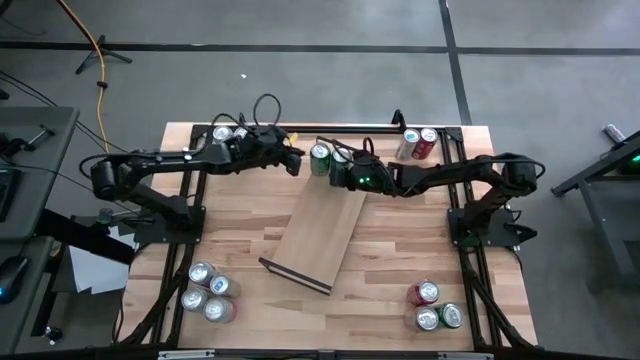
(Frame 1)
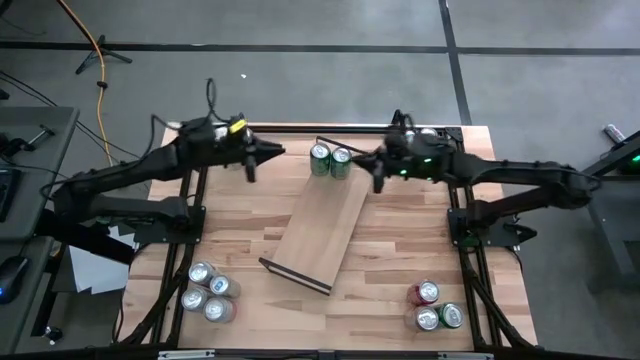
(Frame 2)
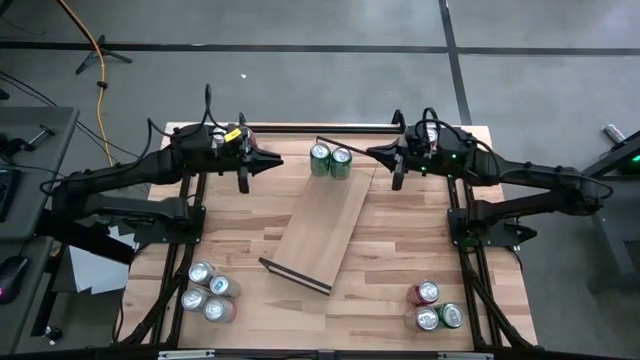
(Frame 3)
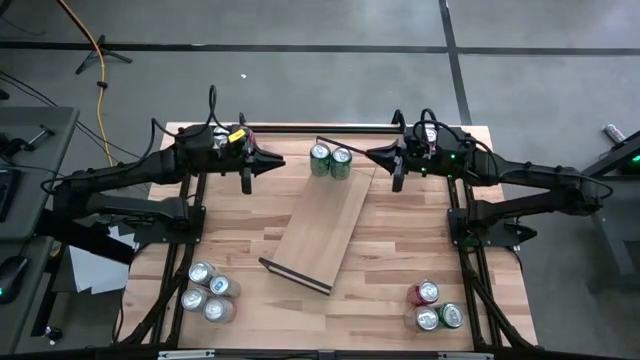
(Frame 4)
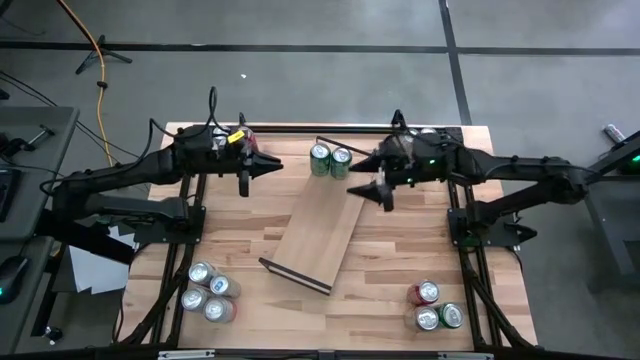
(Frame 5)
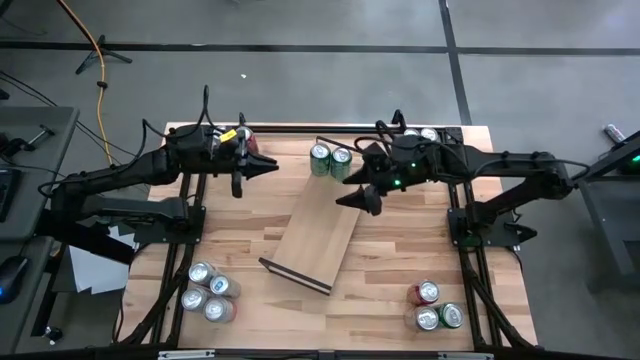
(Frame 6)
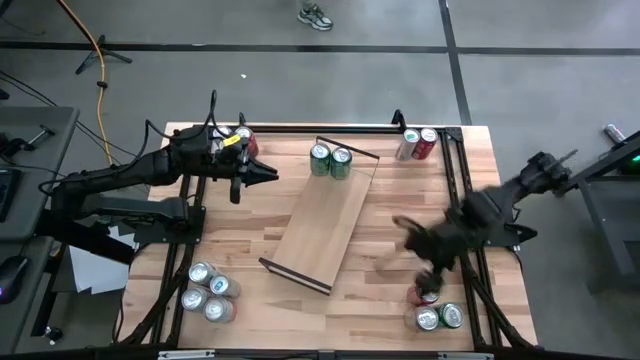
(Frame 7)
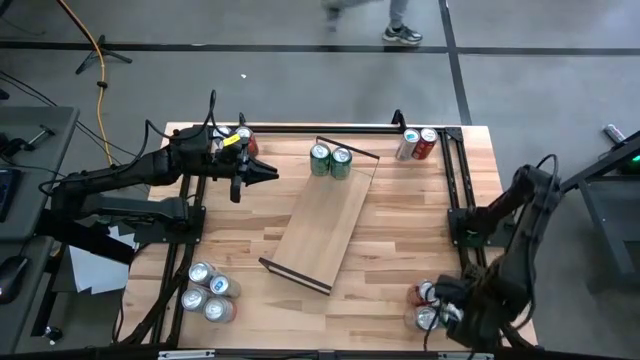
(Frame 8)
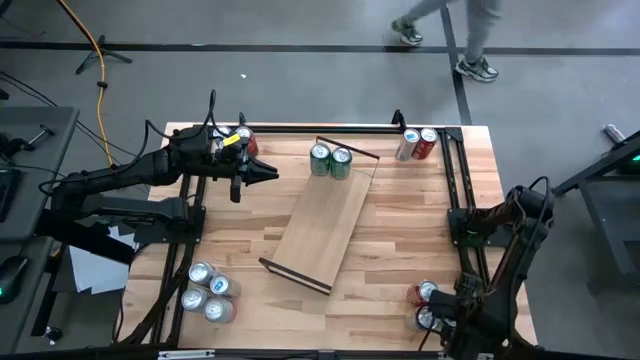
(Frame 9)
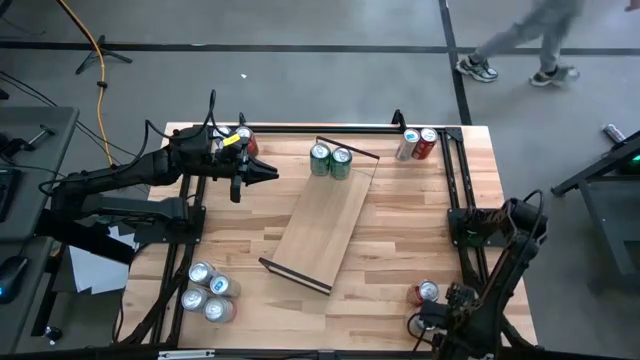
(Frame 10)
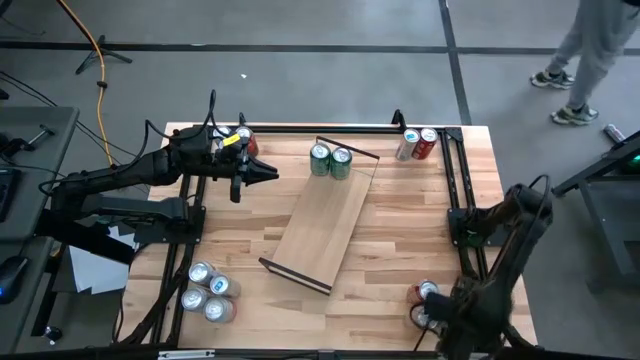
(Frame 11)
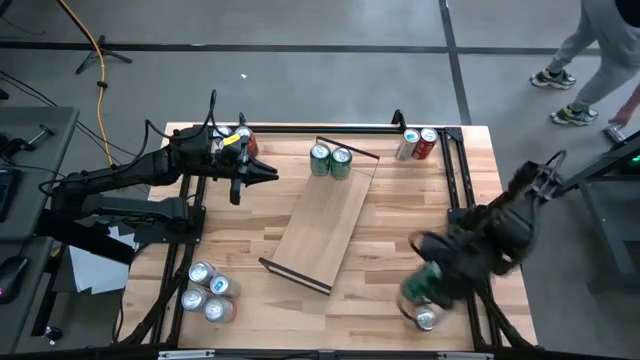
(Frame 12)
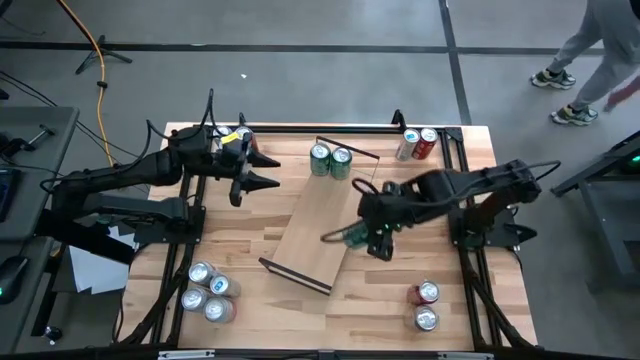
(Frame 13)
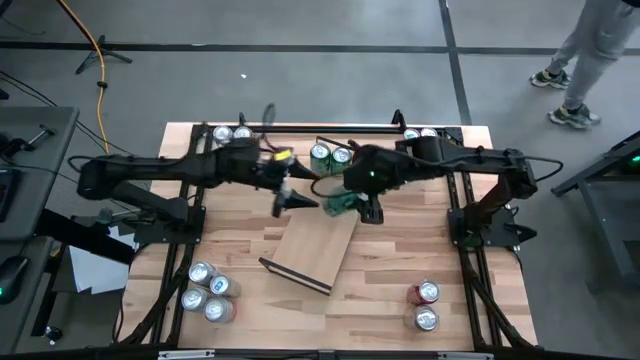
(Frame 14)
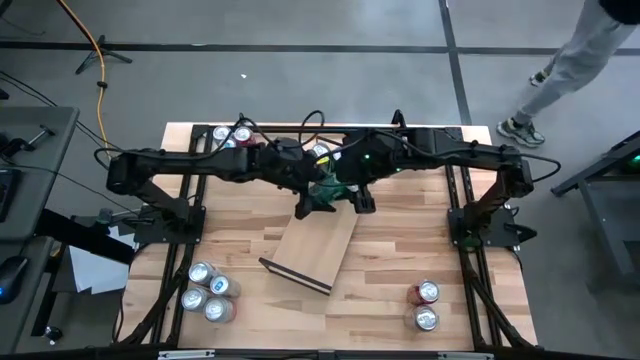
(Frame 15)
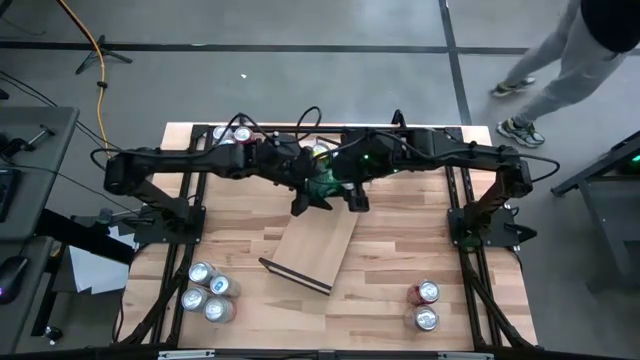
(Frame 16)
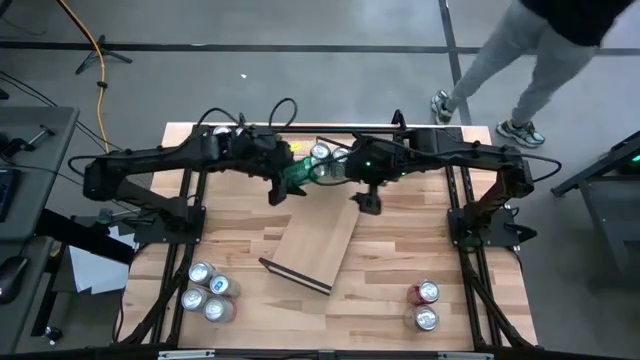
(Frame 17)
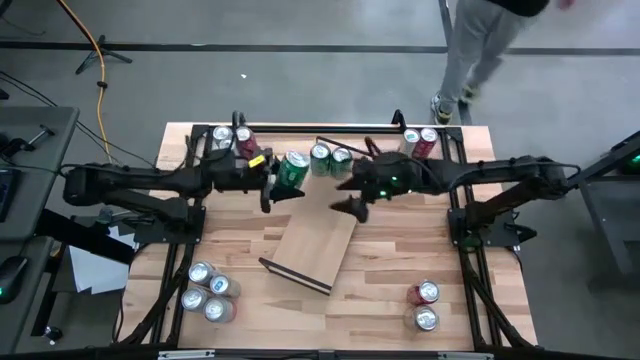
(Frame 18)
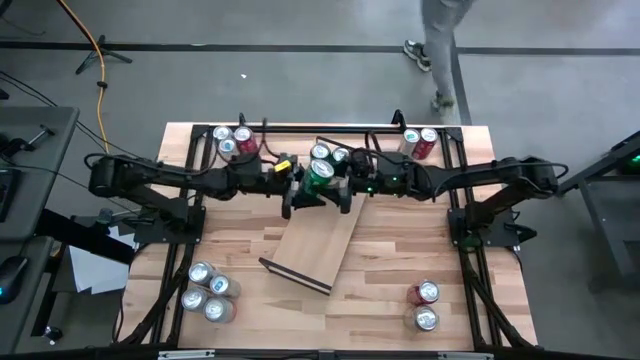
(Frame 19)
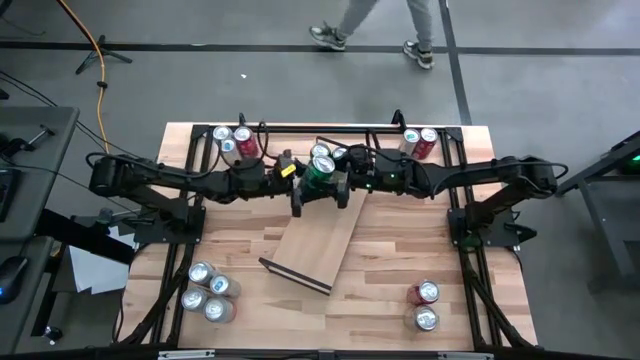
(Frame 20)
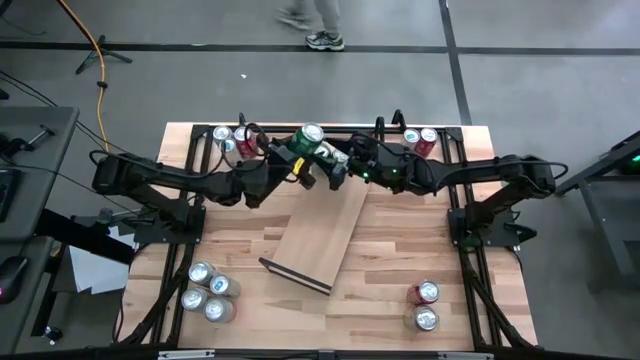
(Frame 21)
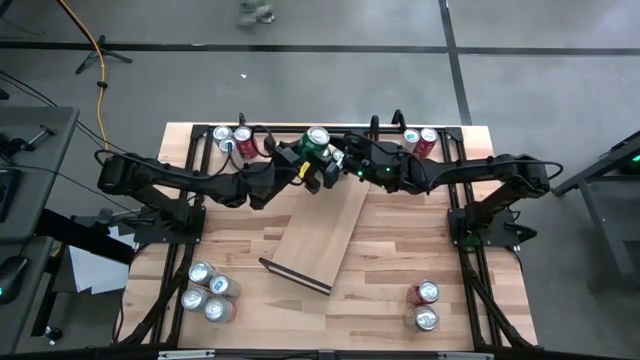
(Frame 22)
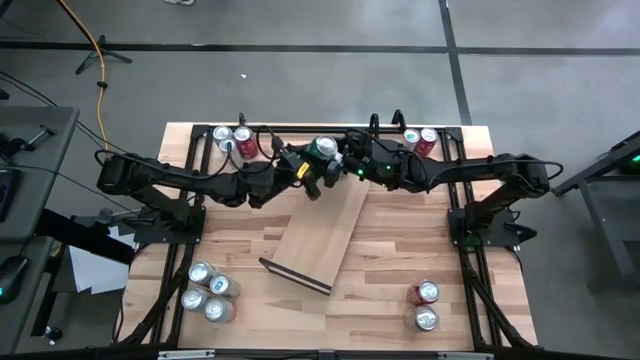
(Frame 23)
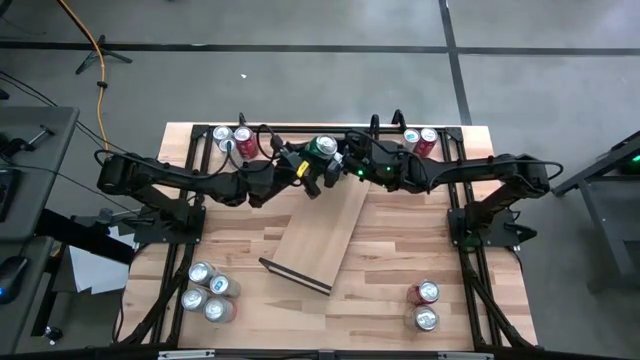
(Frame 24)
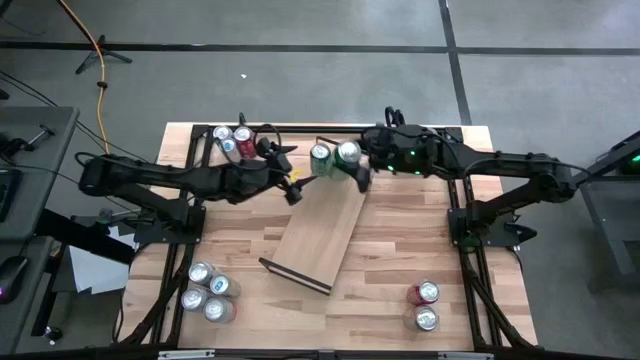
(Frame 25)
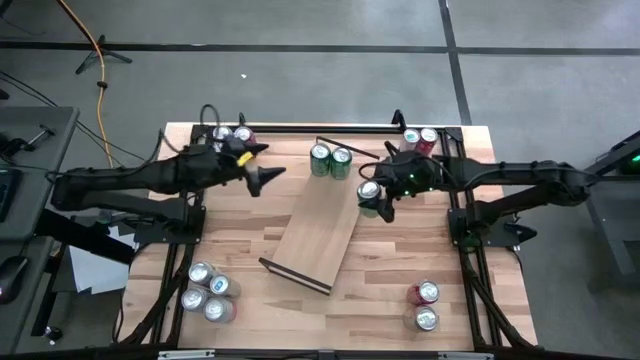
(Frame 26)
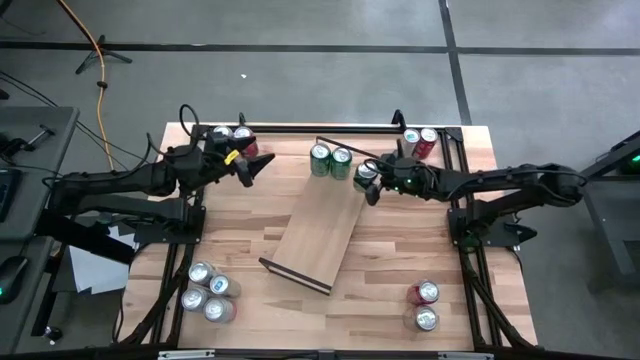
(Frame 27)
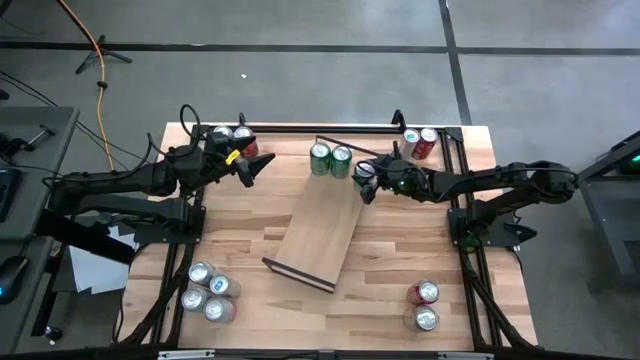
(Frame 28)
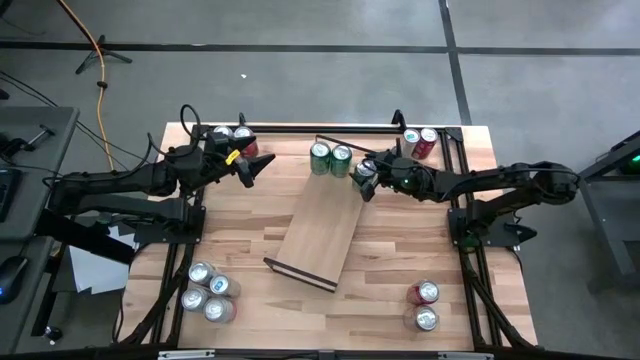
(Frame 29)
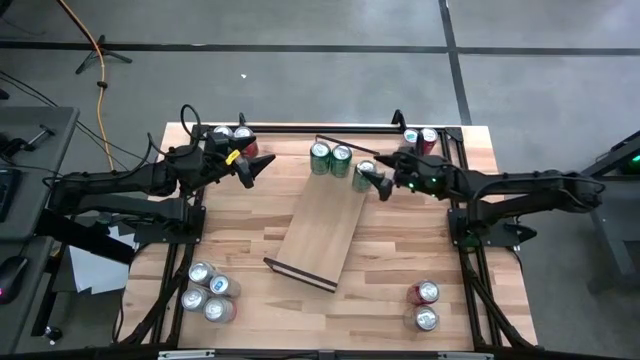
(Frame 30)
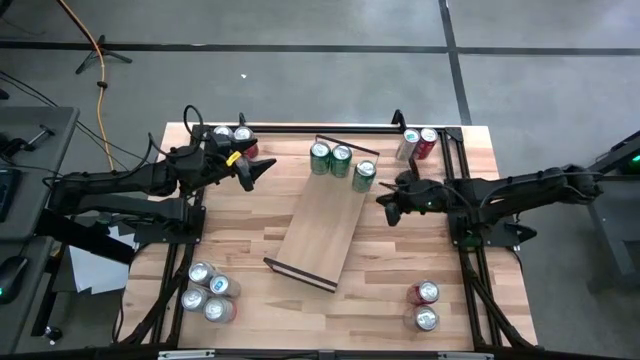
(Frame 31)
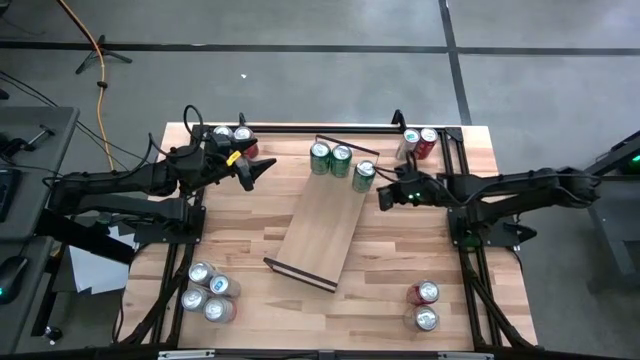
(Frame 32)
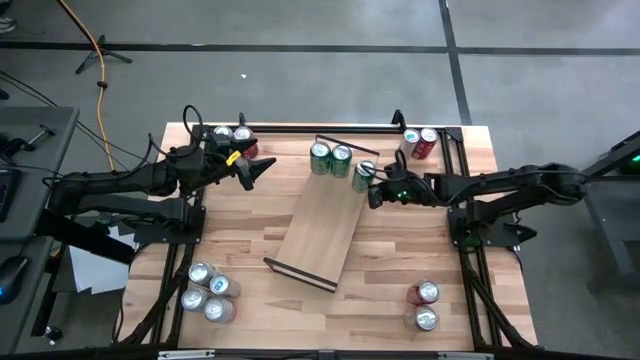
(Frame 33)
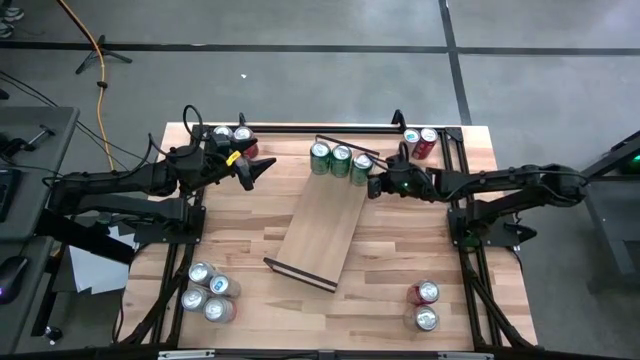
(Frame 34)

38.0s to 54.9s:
Task: Place canned beverage on shelf
Put the green soda can on the shelf aligned with the other green soda can
